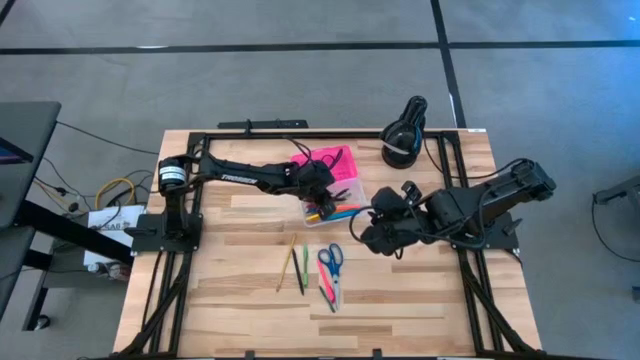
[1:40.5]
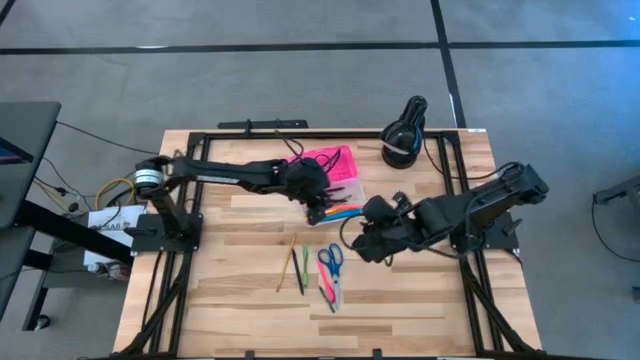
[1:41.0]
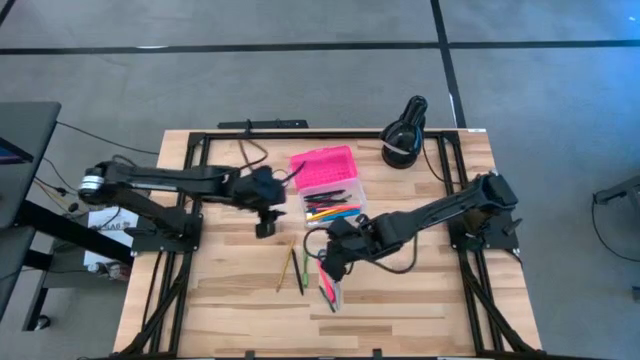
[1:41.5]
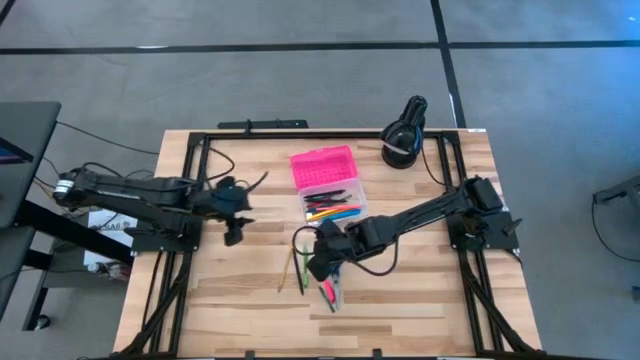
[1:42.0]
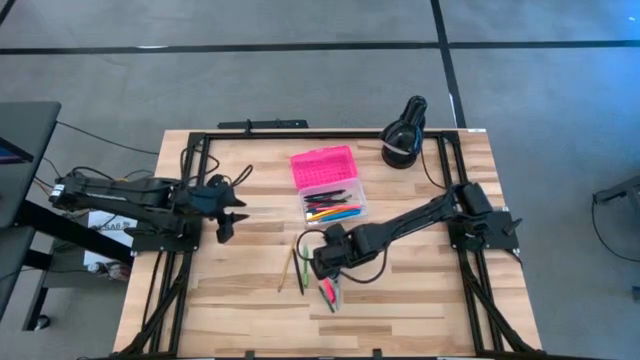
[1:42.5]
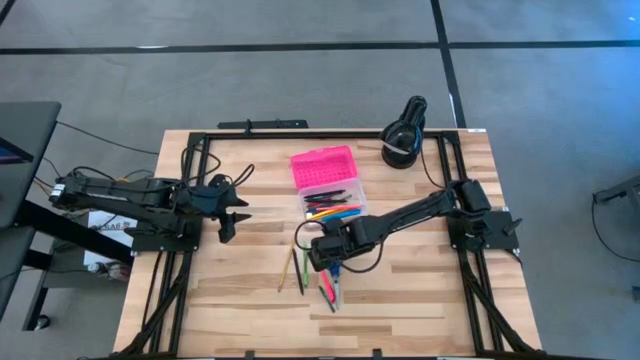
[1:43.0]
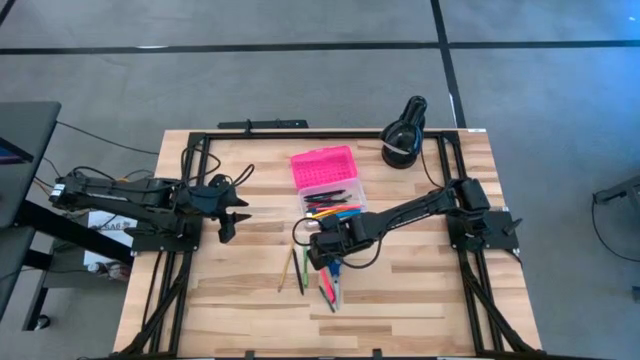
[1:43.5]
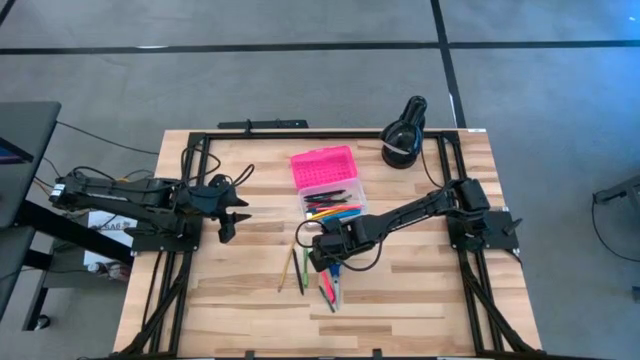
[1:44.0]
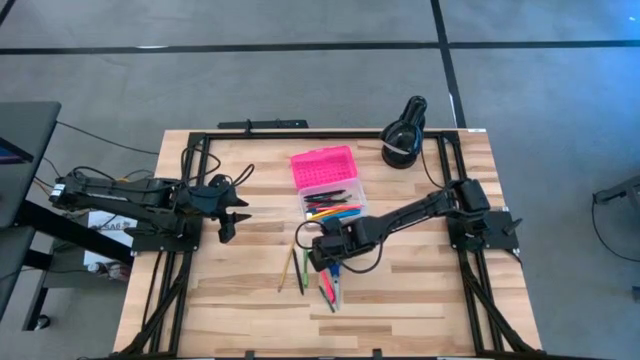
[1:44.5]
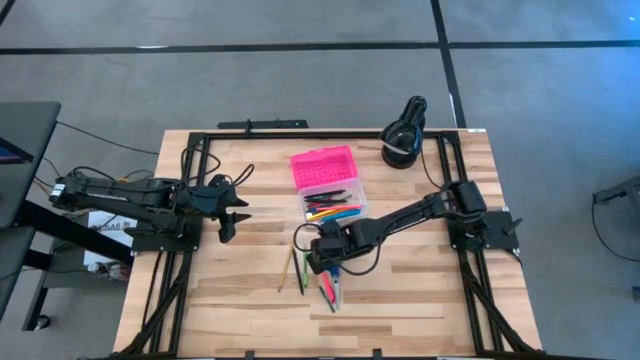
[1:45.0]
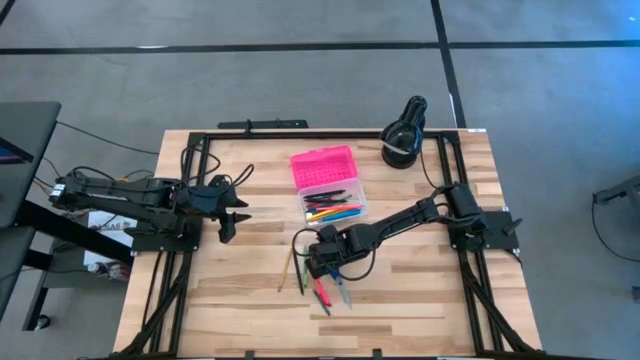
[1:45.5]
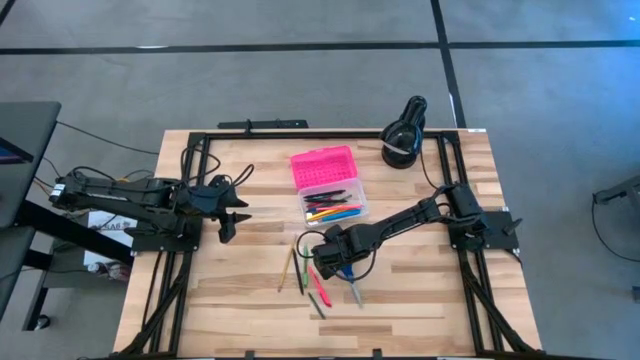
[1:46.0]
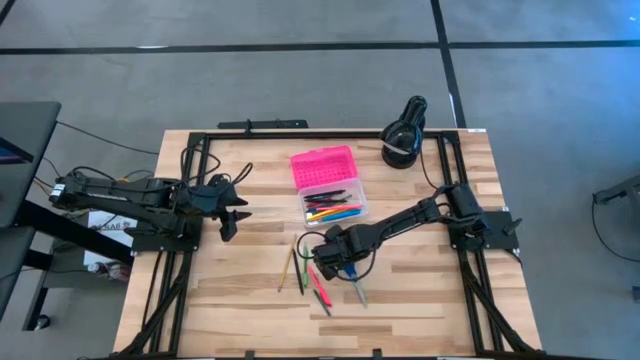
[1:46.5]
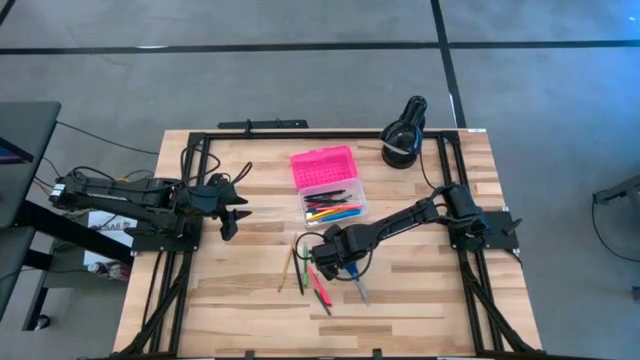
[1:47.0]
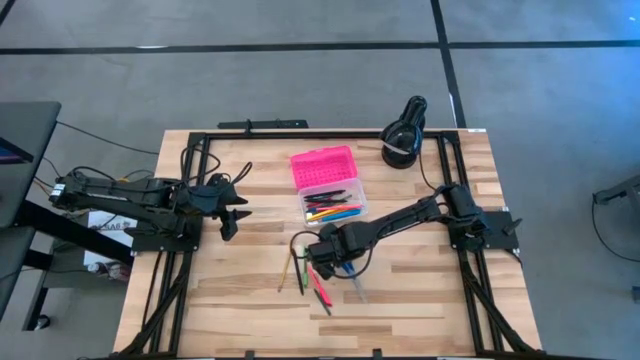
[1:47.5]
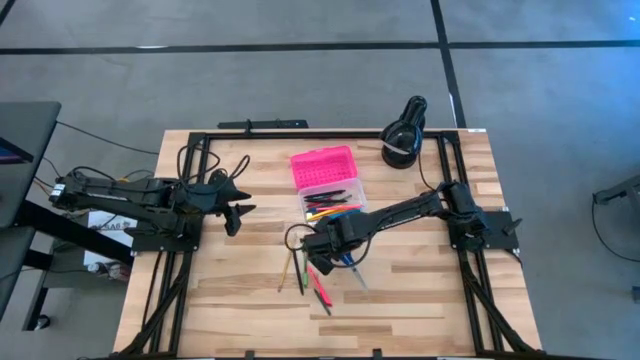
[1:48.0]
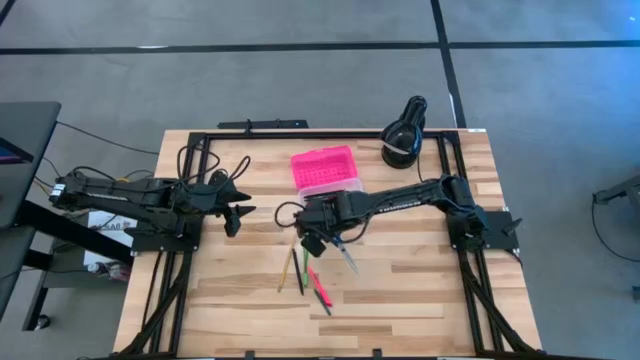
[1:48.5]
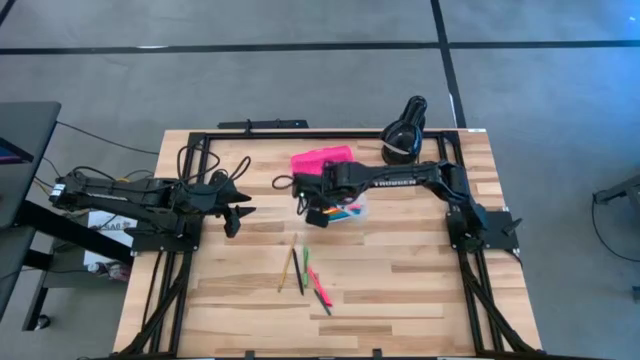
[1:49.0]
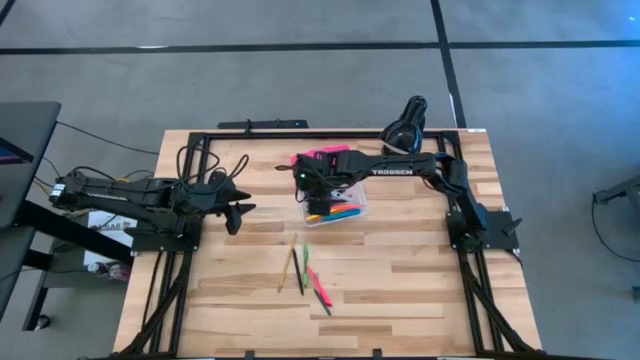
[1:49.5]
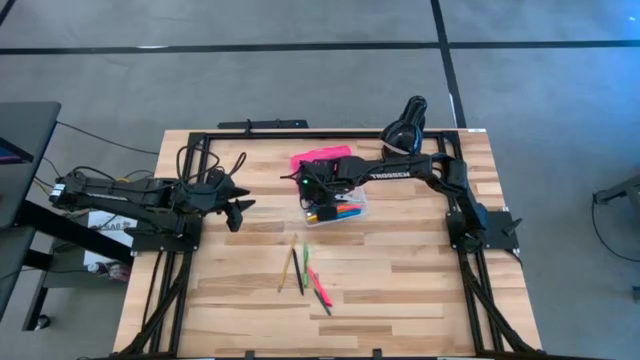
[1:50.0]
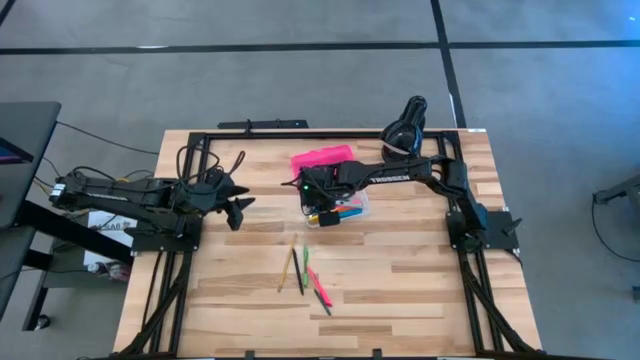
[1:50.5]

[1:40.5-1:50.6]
Task: Pick & place school supplies into a supply box
Put the blue scissors into the pink supply box

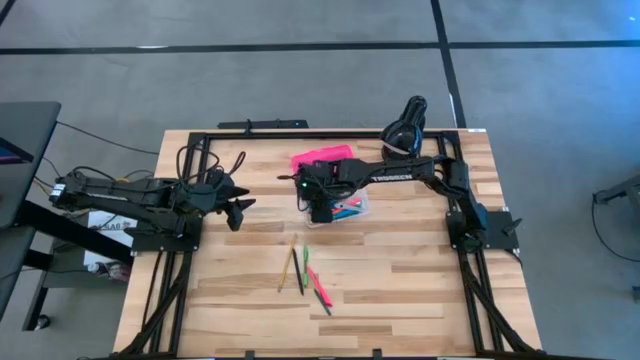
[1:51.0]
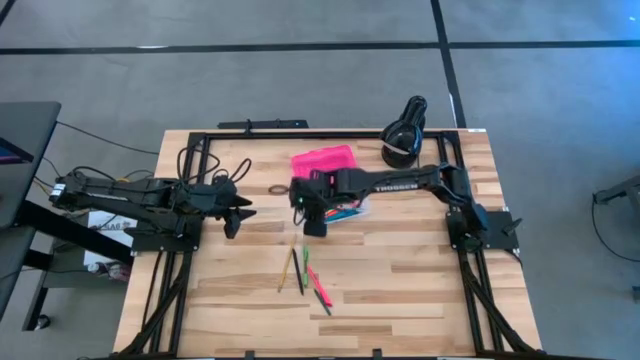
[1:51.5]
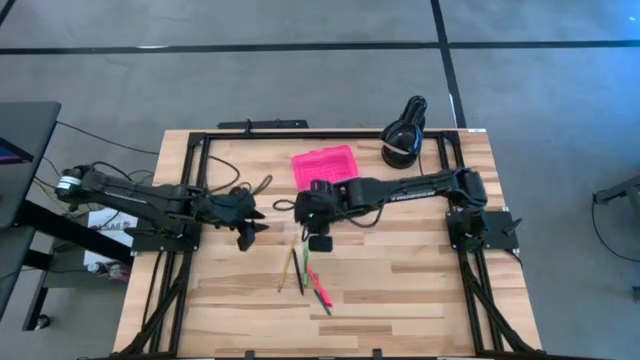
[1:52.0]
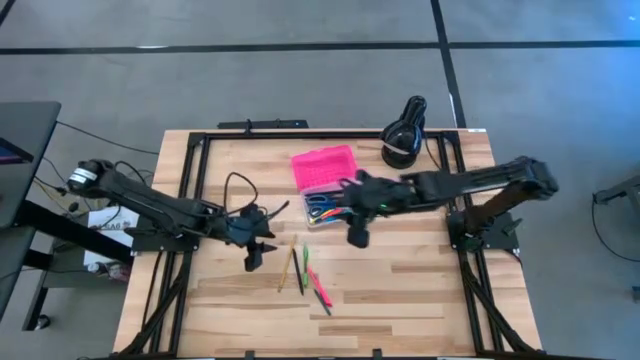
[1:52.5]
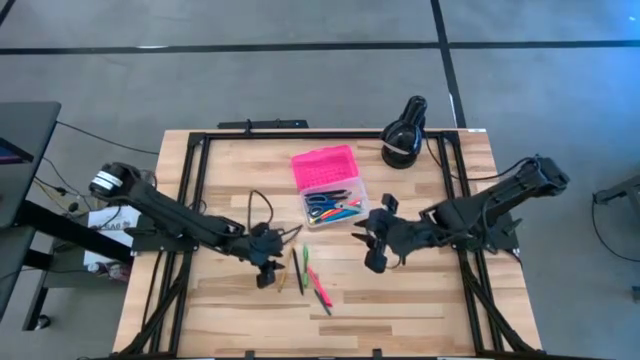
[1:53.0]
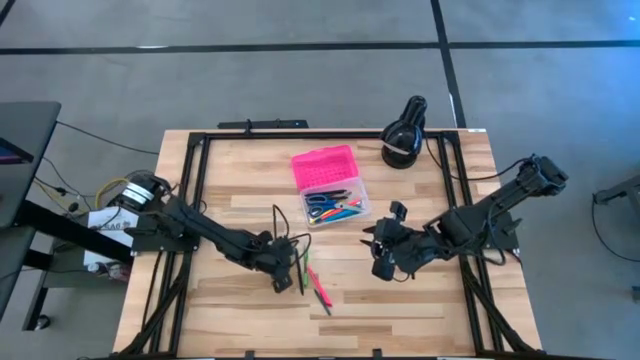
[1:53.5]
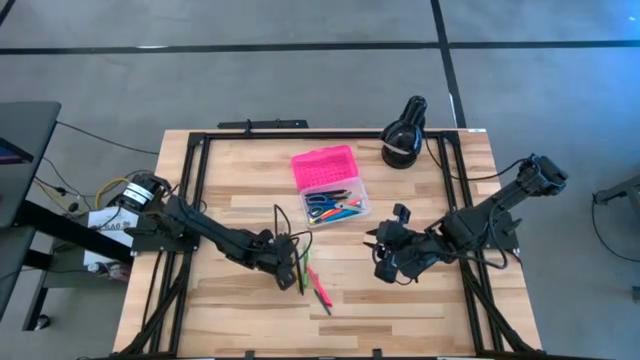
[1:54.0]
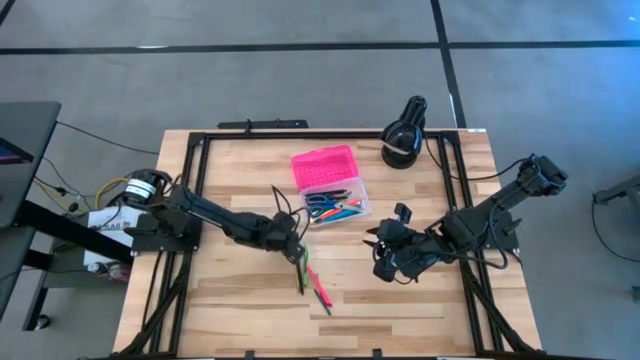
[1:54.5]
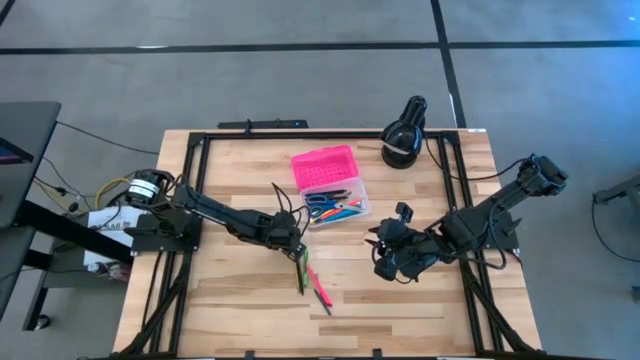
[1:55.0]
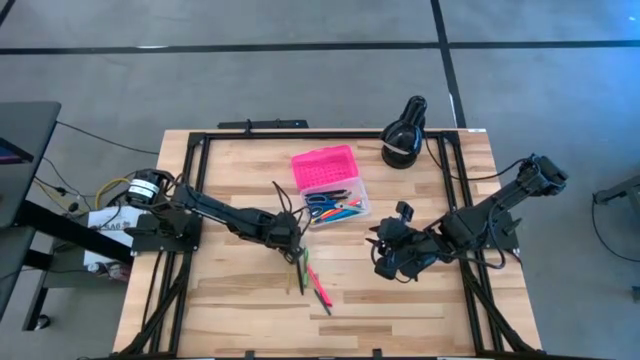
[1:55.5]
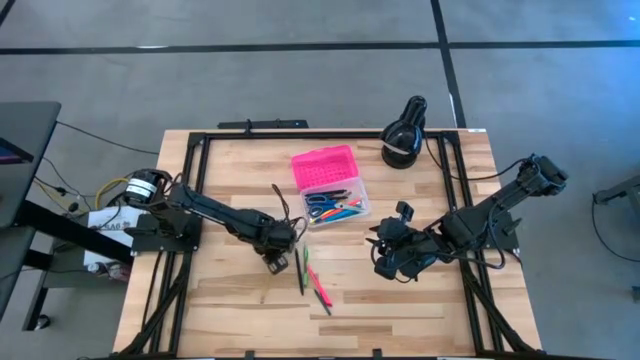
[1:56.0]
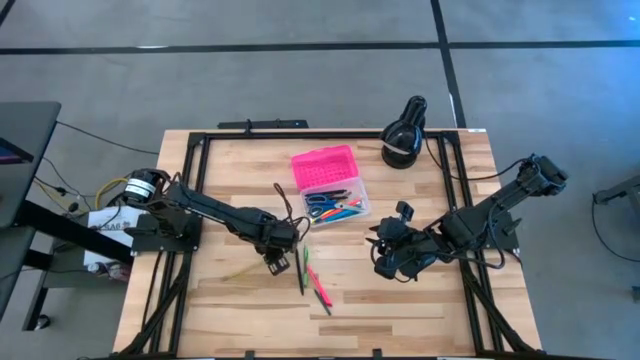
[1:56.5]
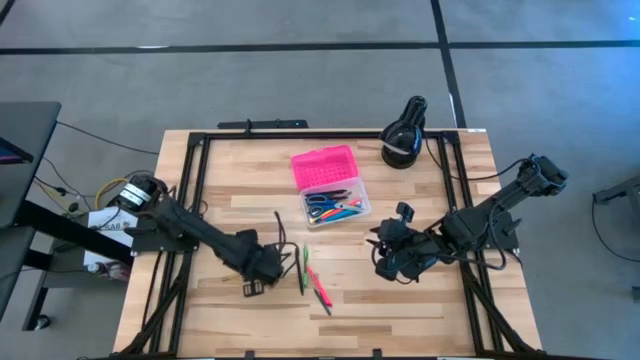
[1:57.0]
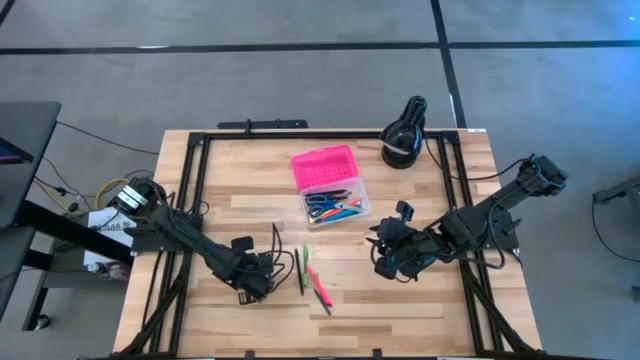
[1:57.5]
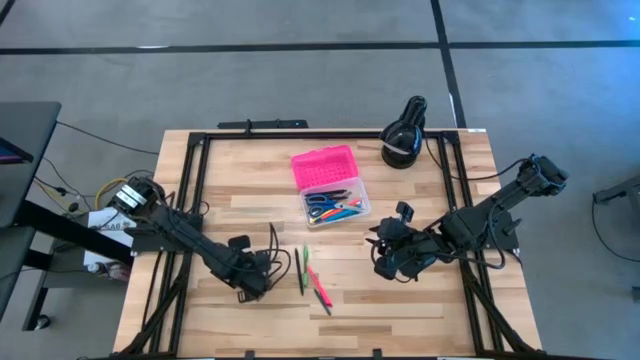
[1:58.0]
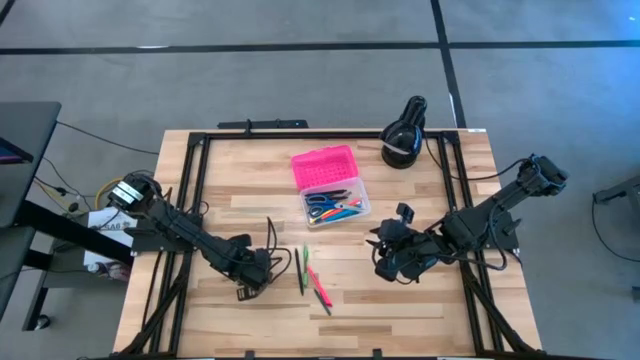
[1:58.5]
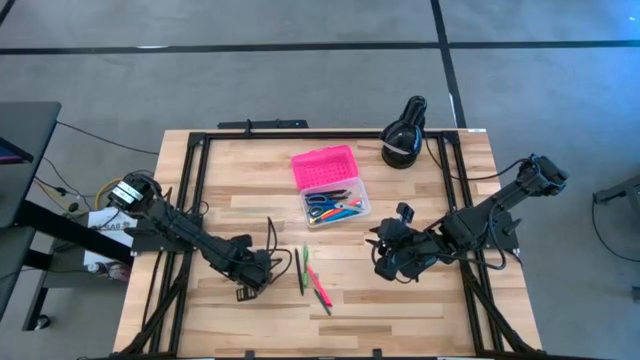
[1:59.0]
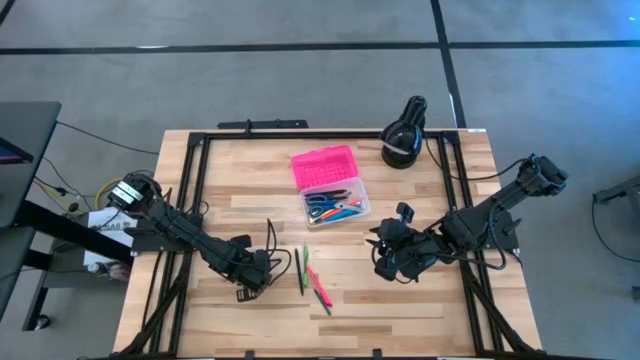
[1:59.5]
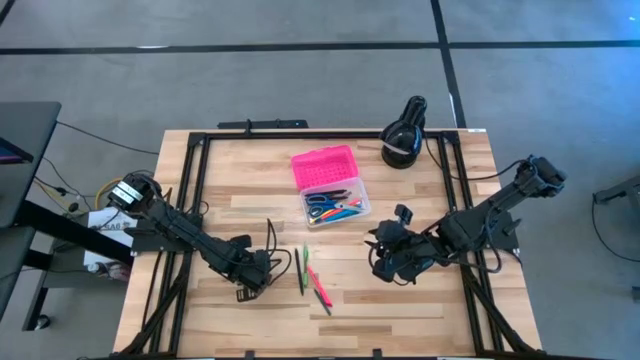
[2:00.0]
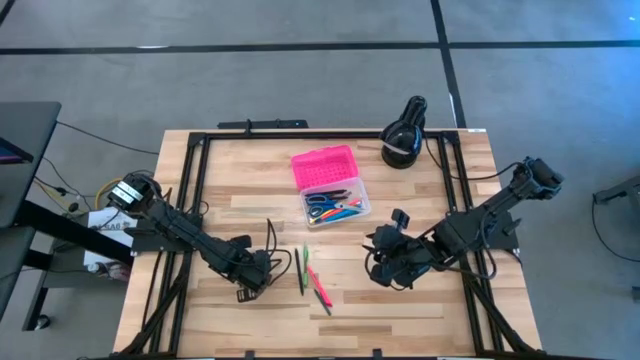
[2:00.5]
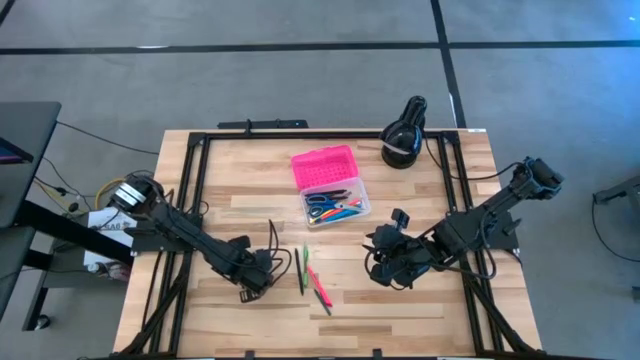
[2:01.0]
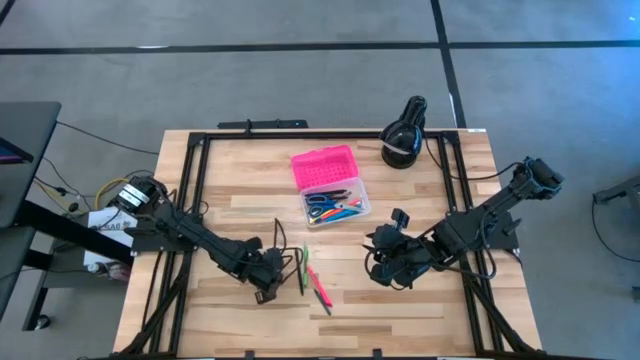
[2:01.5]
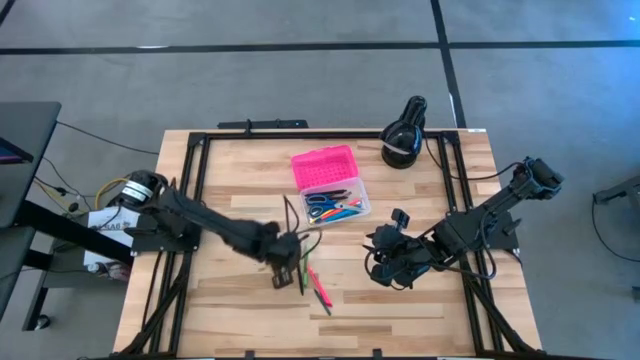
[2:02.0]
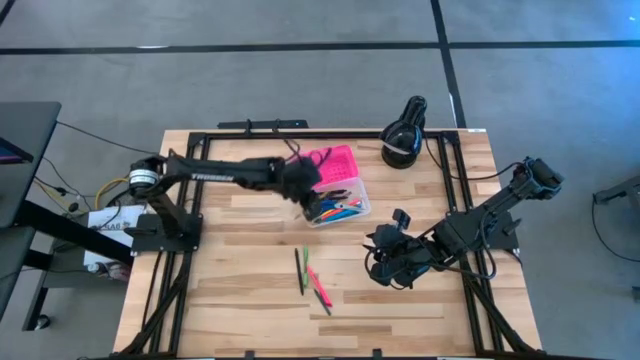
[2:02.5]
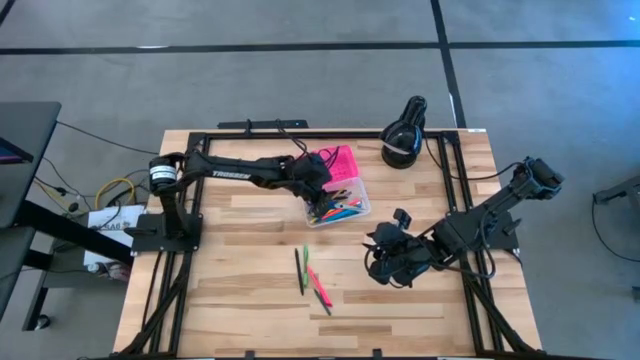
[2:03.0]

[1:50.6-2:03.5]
Put the yellow pencil into the pink supply box
